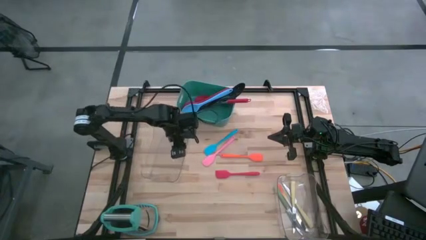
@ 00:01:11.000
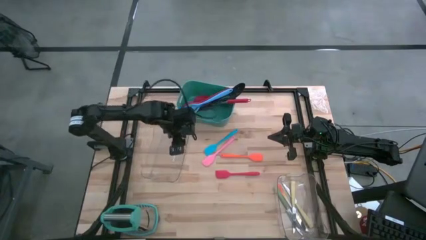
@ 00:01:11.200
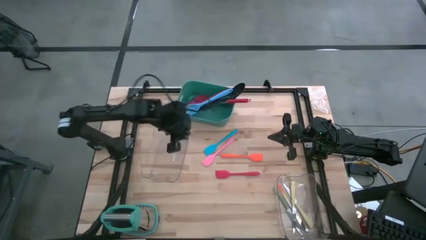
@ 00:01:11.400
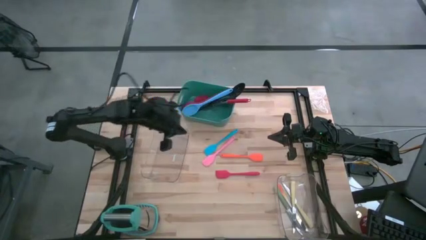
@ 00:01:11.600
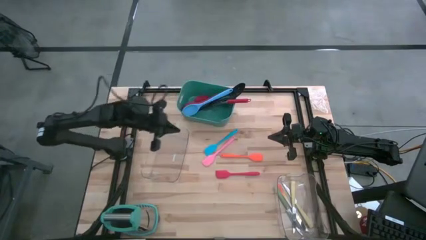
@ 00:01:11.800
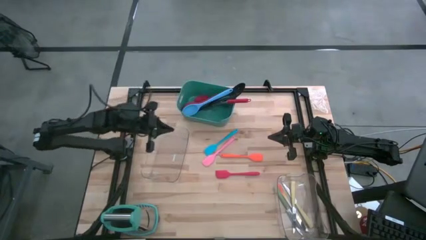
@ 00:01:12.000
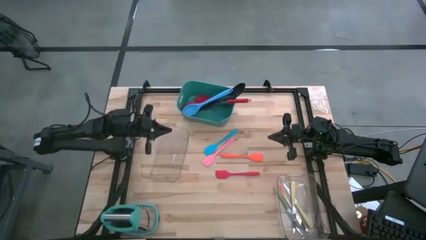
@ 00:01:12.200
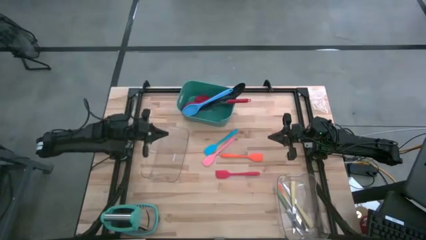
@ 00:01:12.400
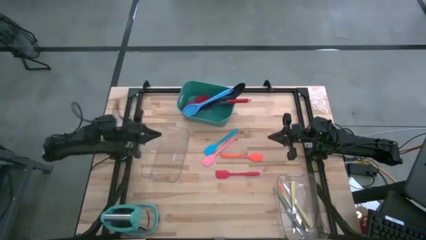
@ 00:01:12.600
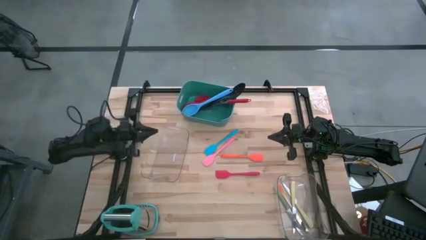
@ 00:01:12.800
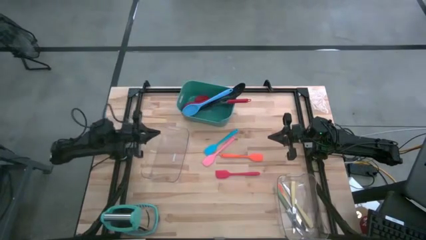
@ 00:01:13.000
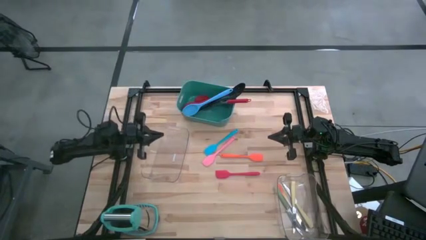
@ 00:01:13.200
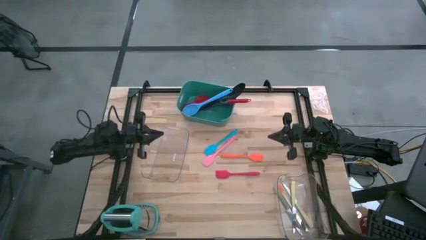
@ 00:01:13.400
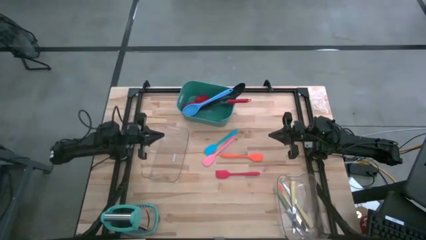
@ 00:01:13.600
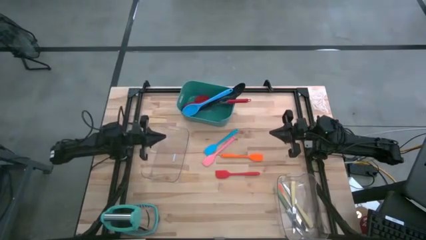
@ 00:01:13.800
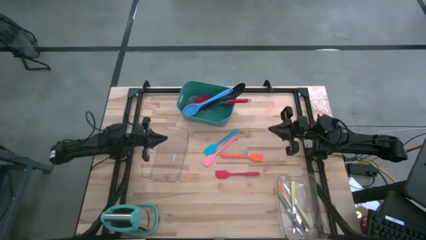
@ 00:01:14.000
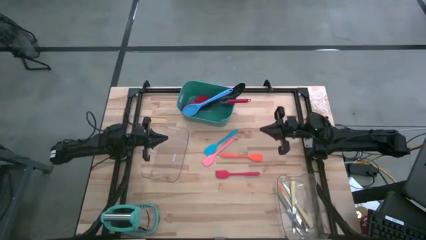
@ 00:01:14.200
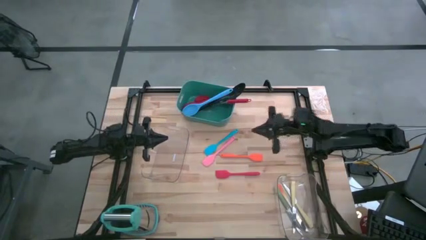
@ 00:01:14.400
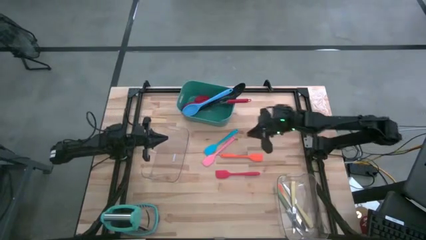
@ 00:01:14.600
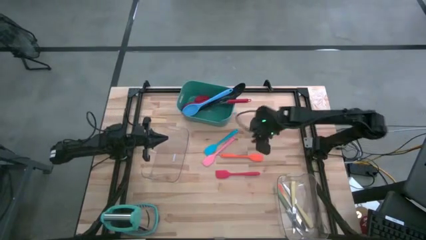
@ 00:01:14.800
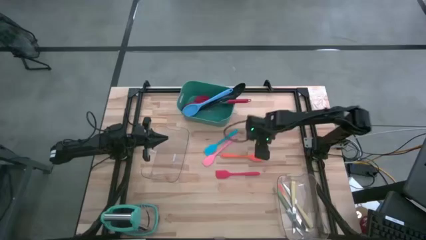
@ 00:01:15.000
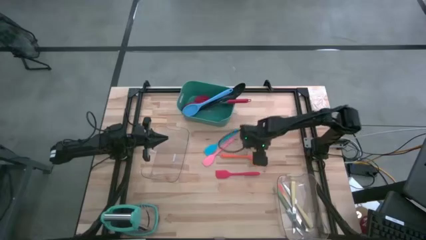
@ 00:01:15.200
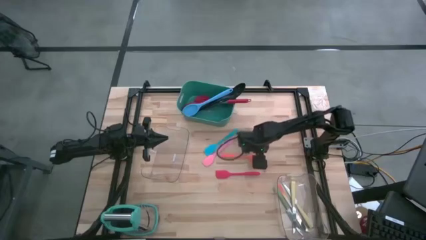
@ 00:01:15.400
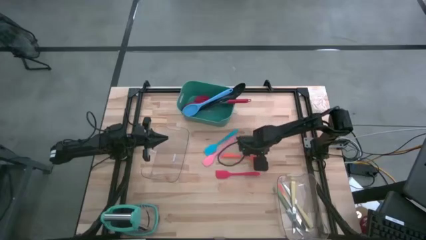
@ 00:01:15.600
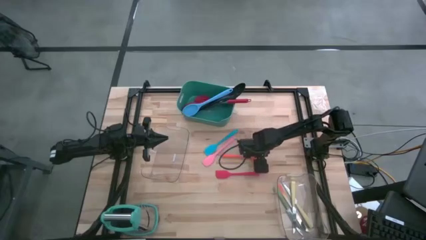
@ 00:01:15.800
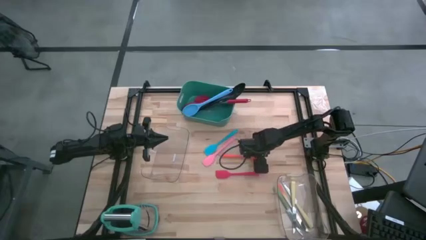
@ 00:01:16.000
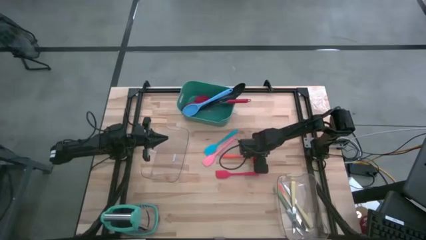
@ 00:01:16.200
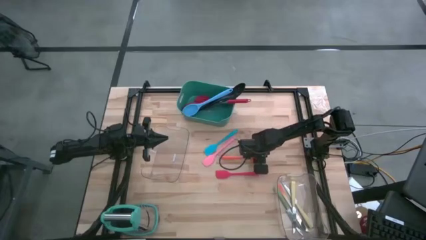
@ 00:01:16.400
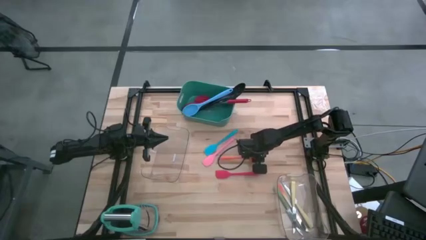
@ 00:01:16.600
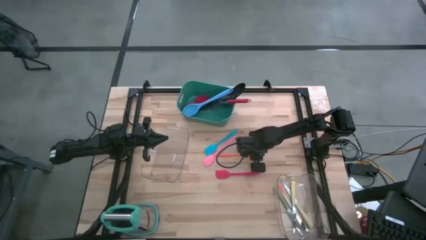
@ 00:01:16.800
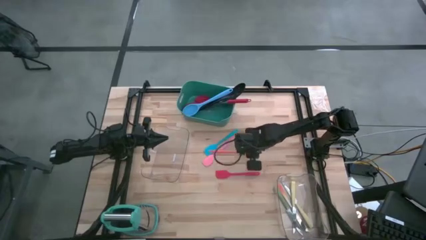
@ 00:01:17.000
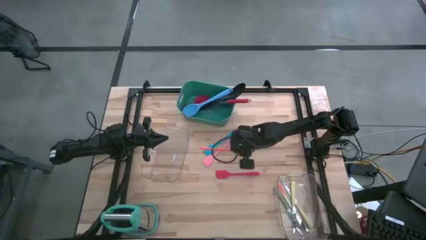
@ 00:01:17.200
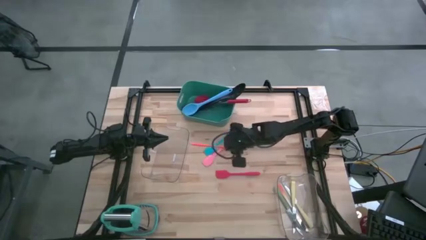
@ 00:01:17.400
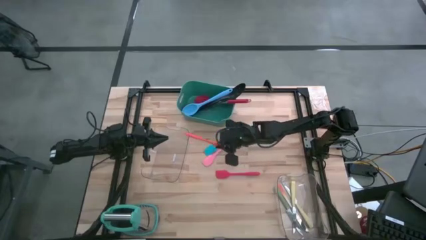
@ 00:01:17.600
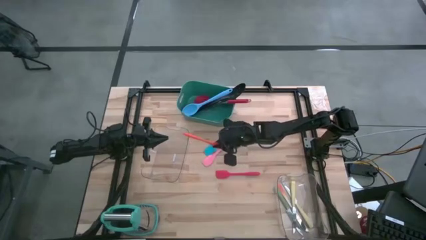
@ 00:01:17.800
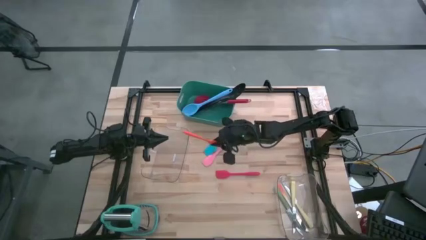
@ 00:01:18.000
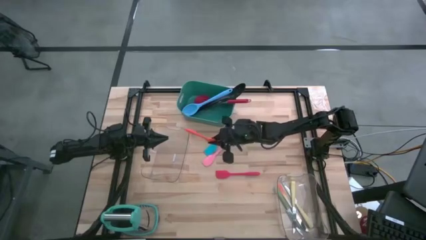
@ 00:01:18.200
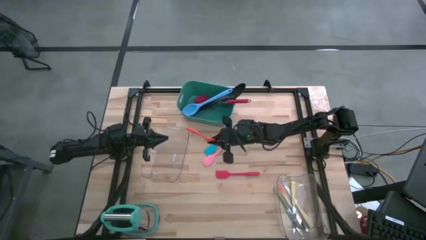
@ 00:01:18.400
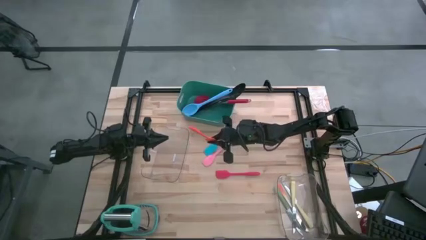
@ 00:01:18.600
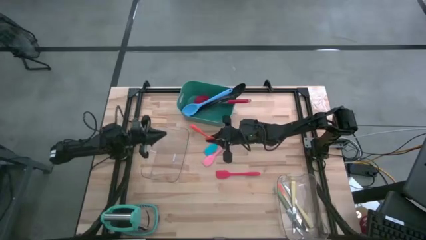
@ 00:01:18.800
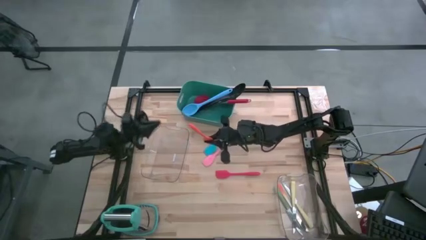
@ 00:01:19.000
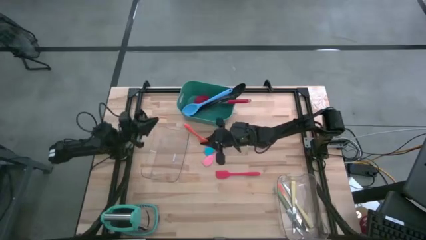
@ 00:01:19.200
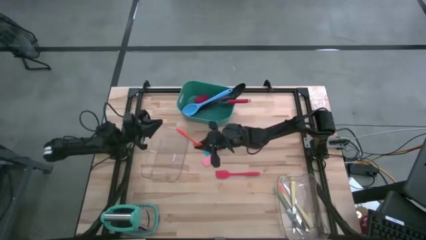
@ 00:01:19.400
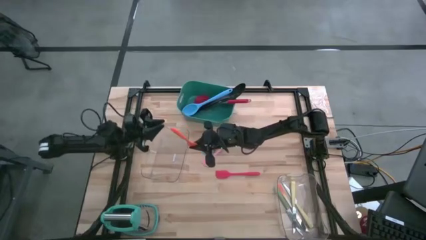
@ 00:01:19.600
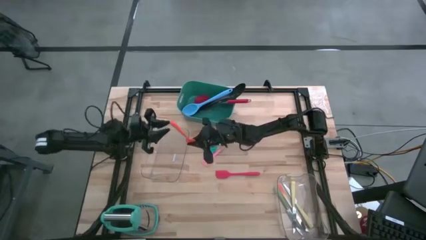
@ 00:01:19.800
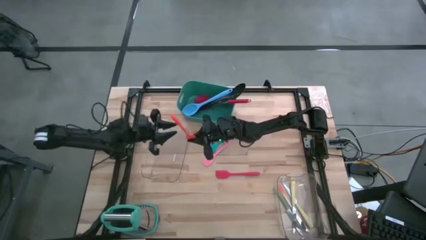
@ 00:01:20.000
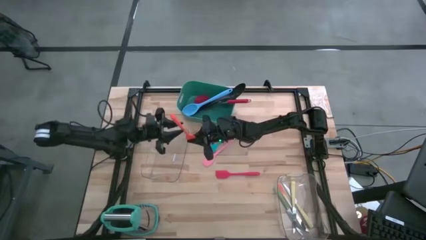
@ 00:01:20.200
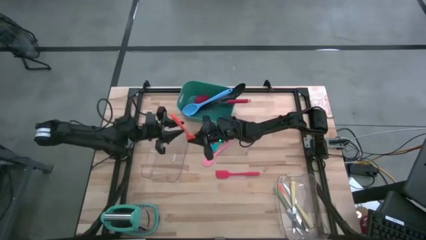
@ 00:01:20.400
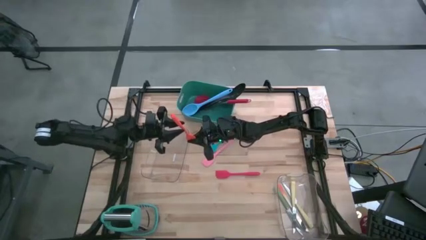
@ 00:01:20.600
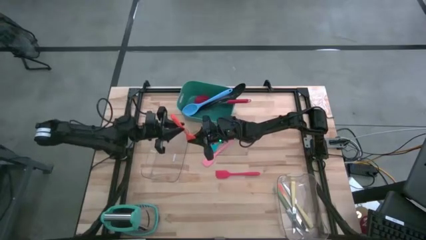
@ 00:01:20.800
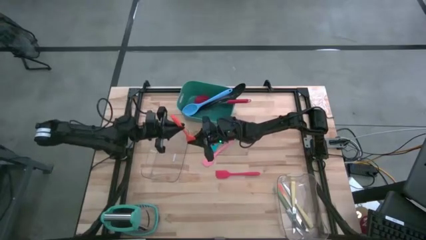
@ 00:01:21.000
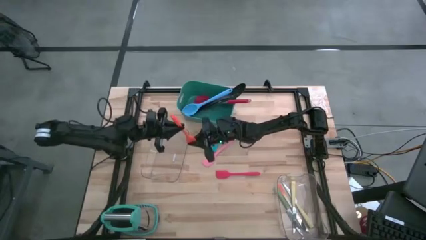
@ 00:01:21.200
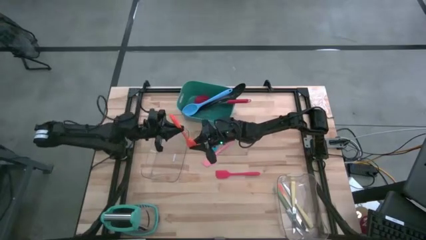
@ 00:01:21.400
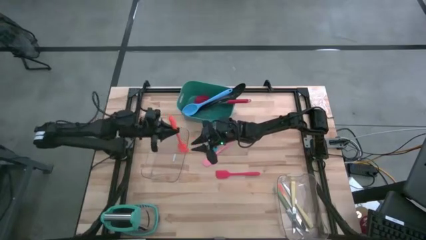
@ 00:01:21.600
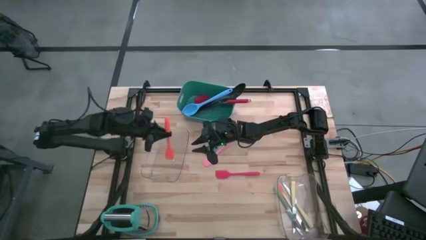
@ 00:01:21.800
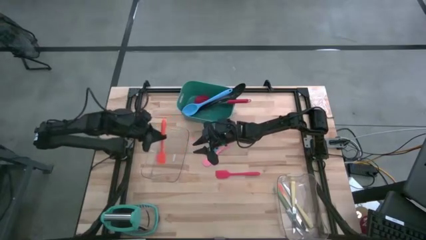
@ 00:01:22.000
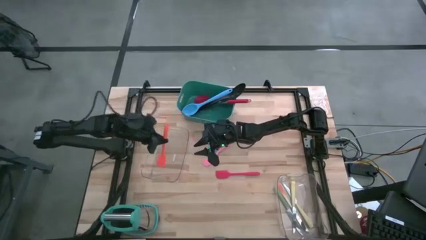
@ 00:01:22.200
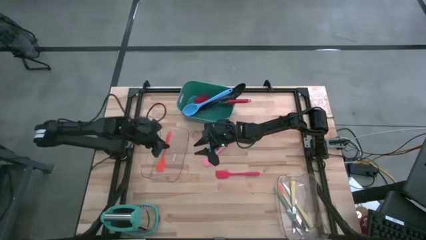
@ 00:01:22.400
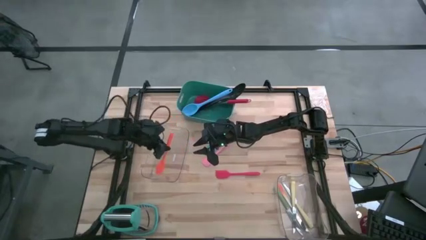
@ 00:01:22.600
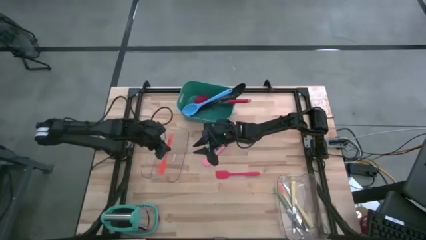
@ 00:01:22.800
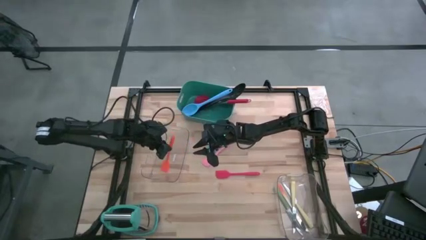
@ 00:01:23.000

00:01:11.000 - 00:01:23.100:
Task: Pick & Place Kitchen Items
Put the orange spatula into the left transparent bin

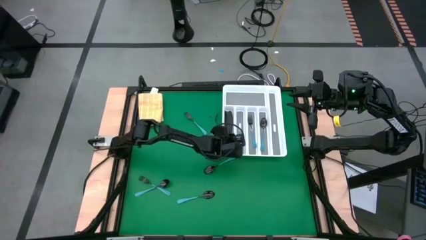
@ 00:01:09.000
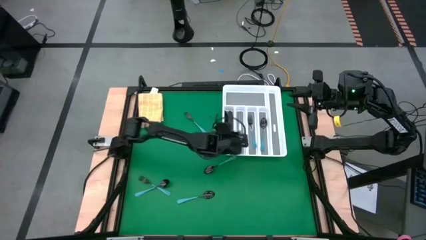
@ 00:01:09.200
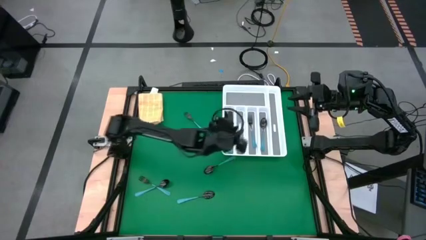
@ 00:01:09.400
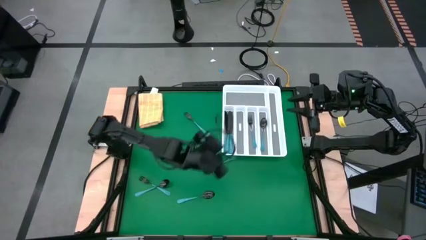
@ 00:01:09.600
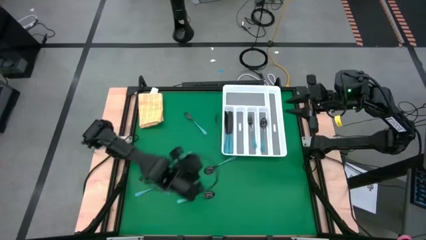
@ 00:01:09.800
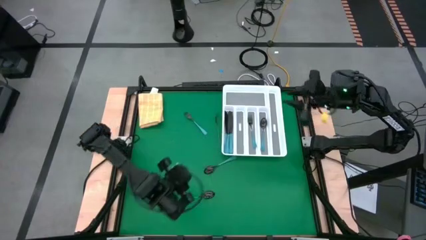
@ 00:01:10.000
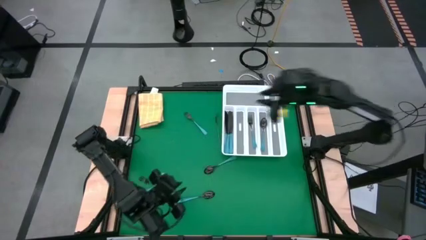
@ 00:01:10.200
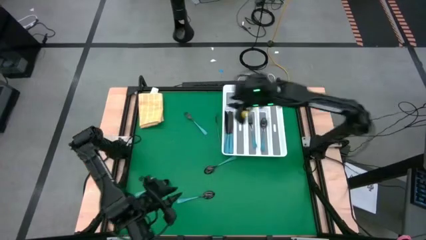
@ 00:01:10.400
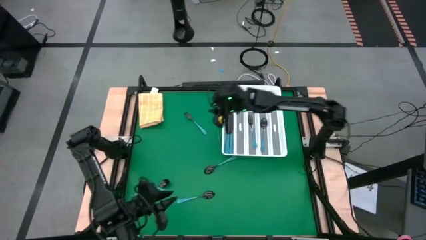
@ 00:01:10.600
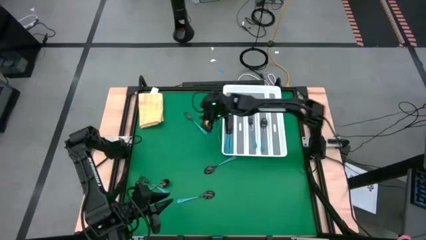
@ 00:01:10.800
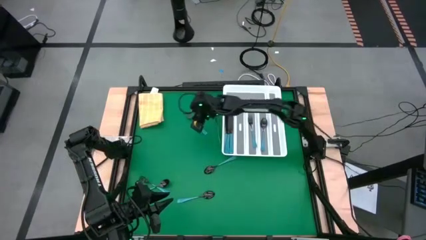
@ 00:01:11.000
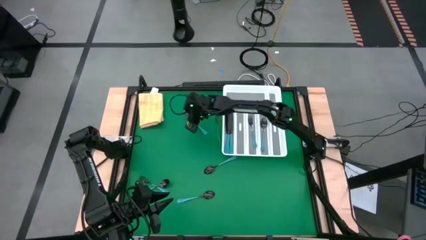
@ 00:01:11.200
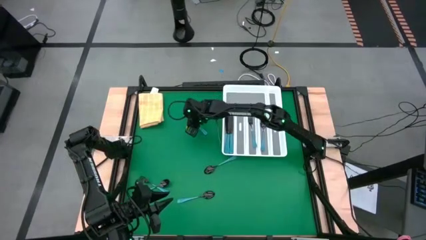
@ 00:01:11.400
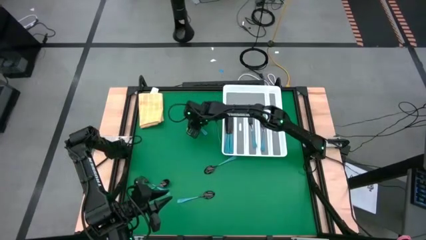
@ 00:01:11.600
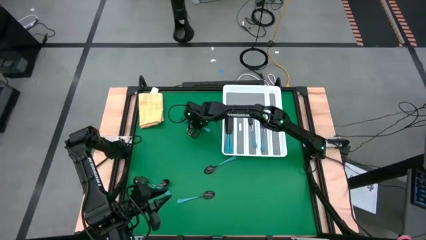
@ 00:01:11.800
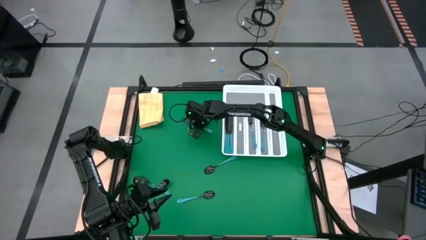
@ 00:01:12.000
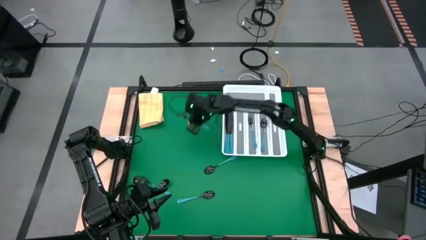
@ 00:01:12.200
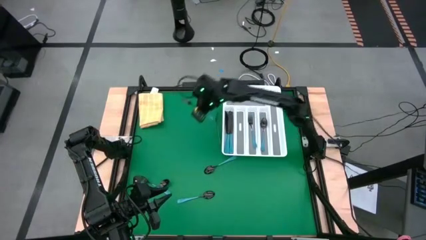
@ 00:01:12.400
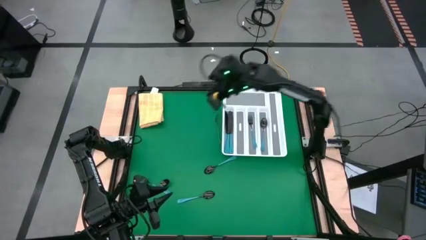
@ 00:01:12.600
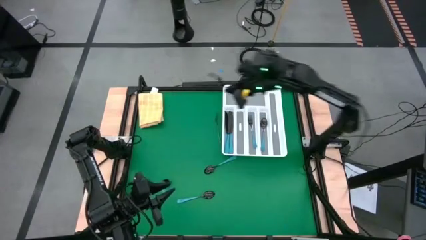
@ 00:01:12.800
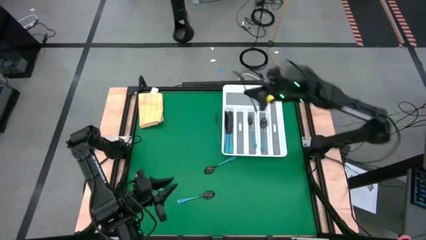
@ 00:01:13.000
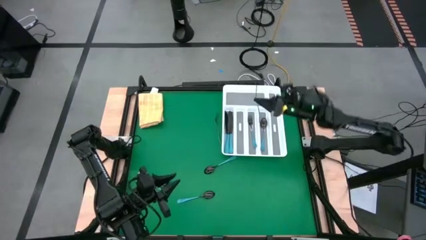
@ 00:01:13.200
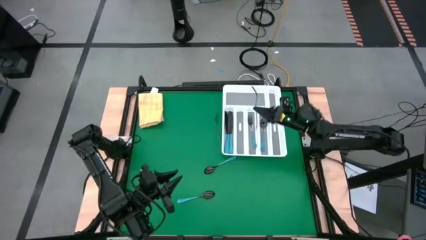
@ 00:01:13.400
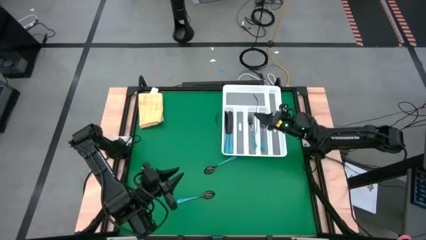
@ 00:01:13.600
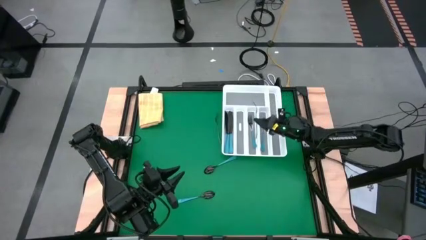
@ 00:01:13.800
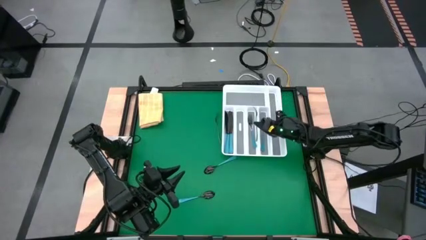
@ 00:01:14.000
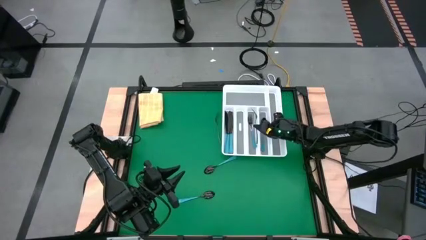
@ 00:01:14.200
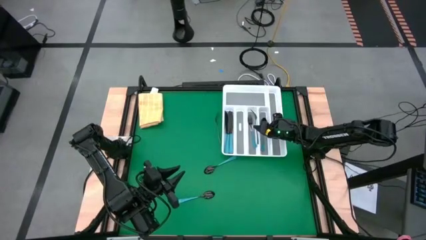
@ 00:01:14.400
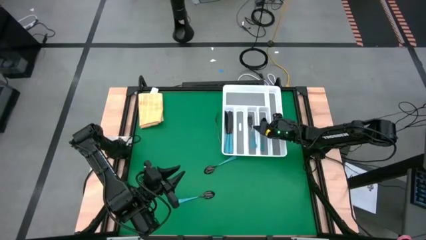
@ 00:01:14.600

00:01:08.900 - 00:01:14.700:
Task: Sort silverware
Put the blue fork into the white cutlery tray
